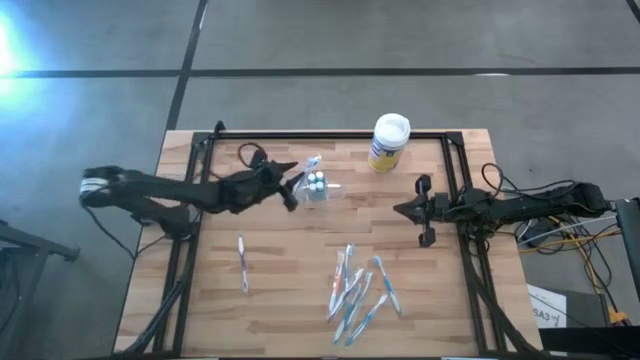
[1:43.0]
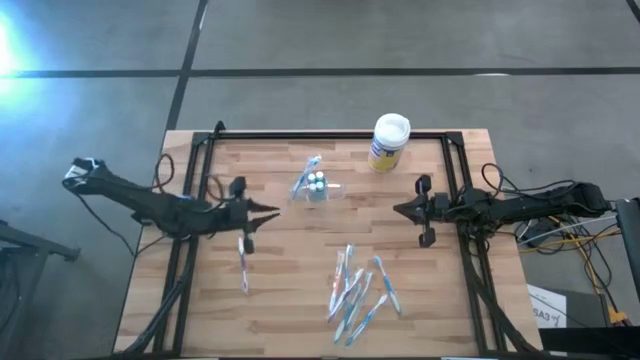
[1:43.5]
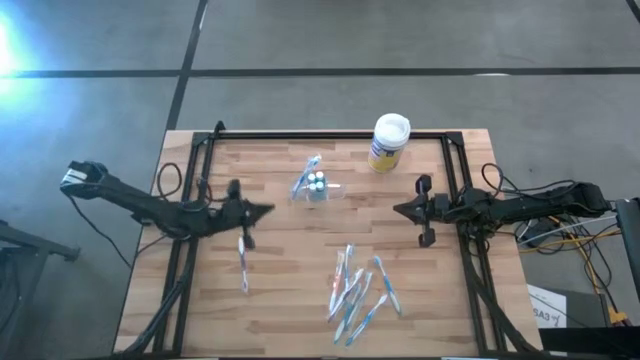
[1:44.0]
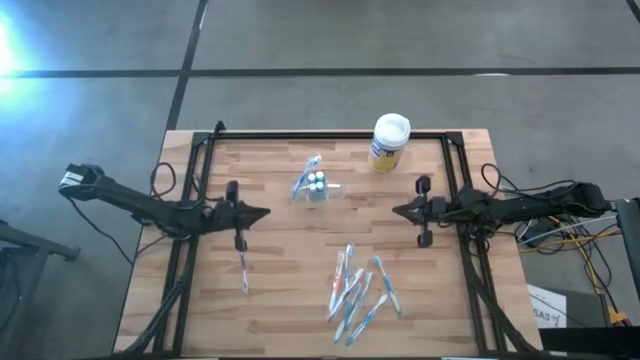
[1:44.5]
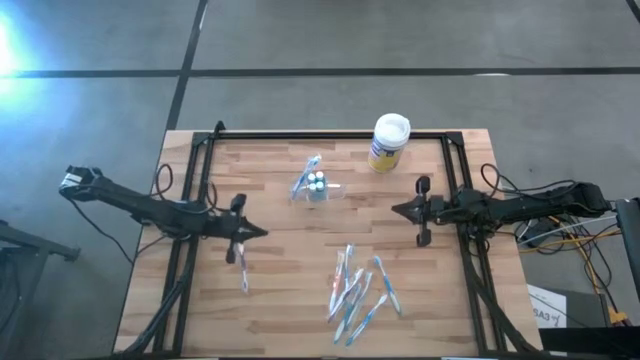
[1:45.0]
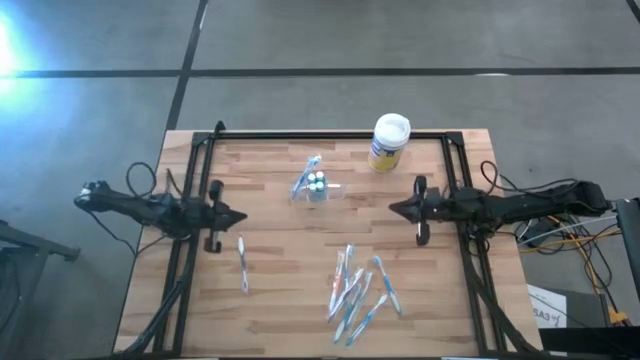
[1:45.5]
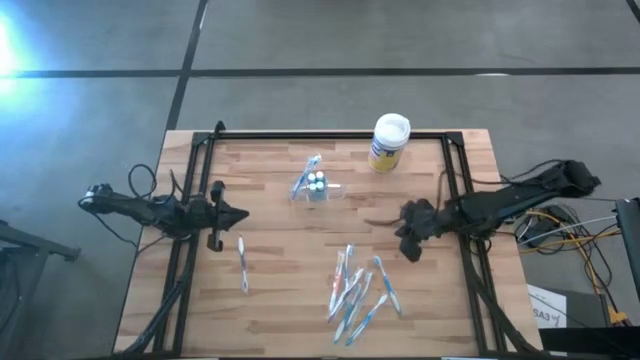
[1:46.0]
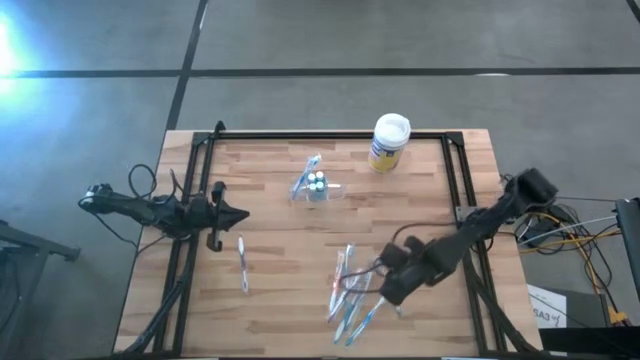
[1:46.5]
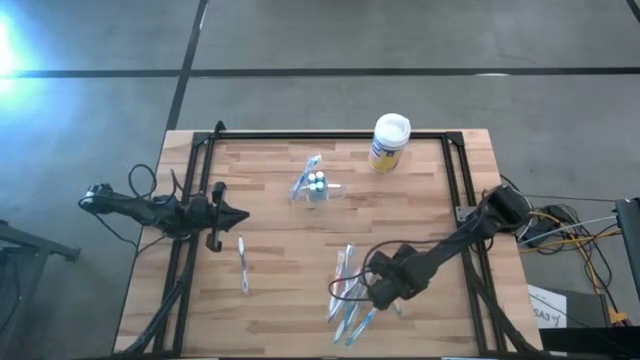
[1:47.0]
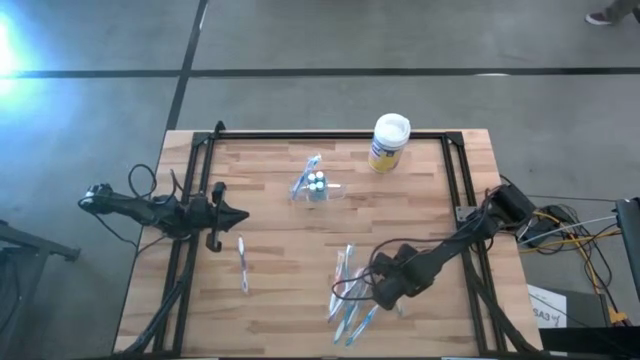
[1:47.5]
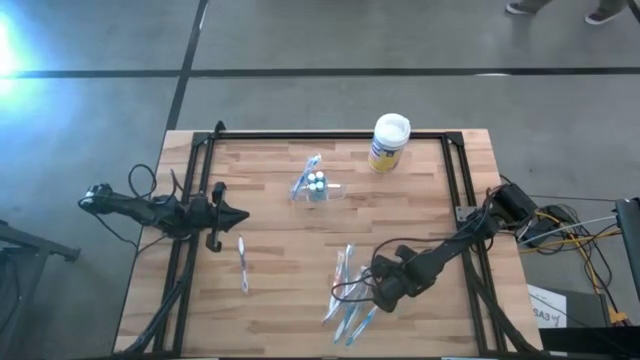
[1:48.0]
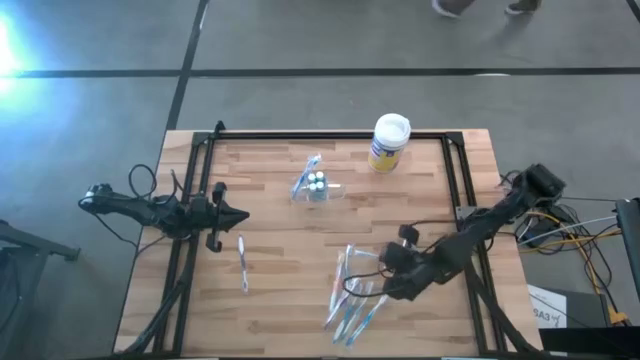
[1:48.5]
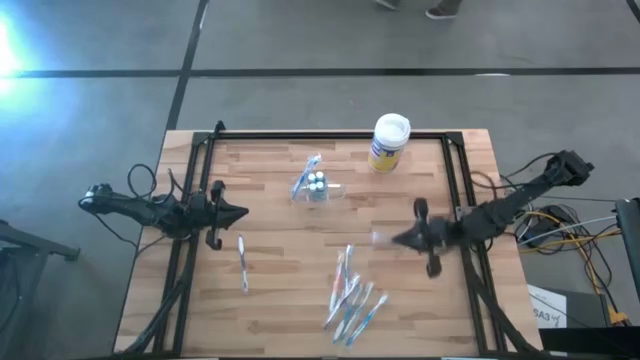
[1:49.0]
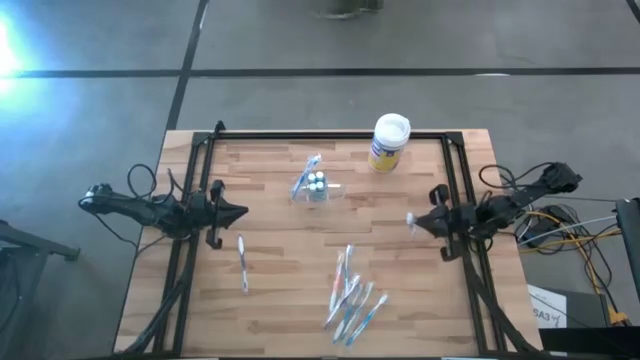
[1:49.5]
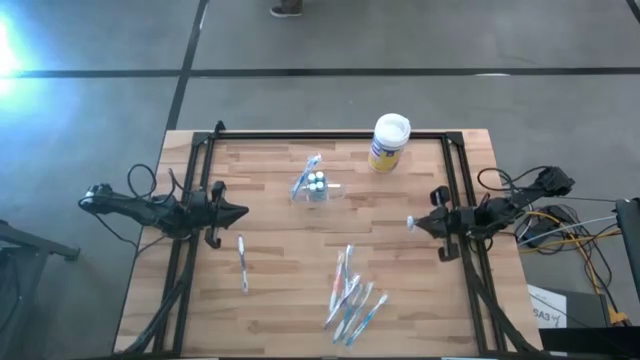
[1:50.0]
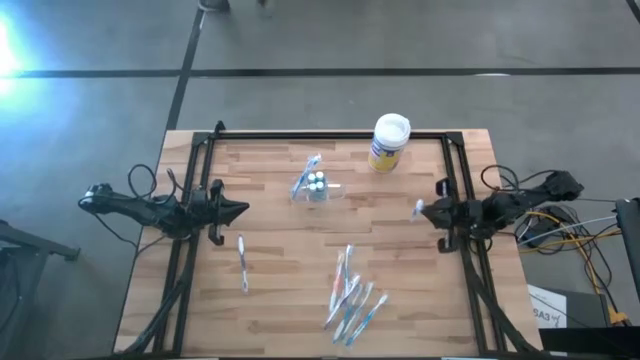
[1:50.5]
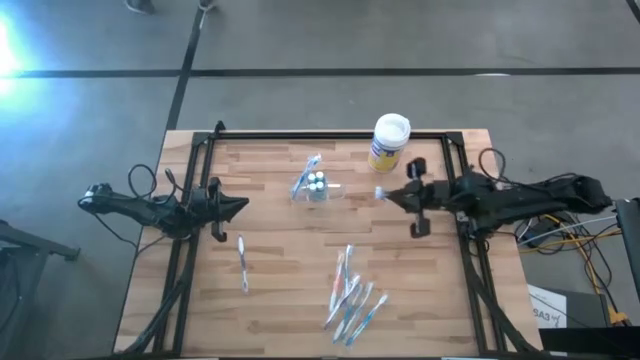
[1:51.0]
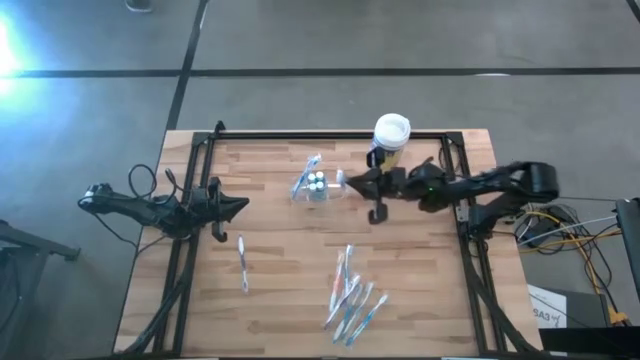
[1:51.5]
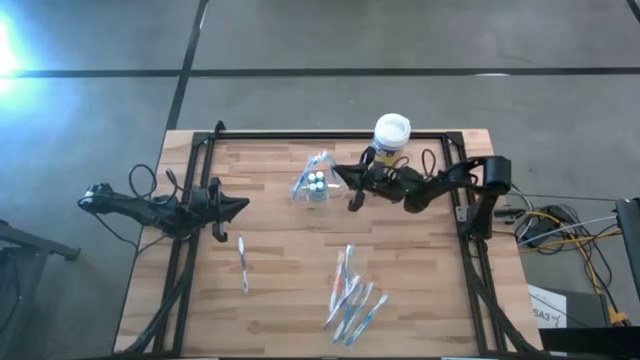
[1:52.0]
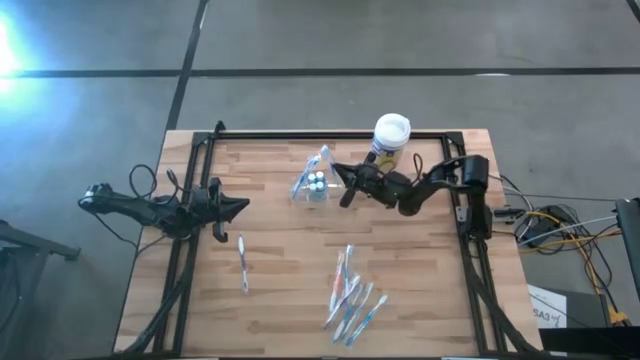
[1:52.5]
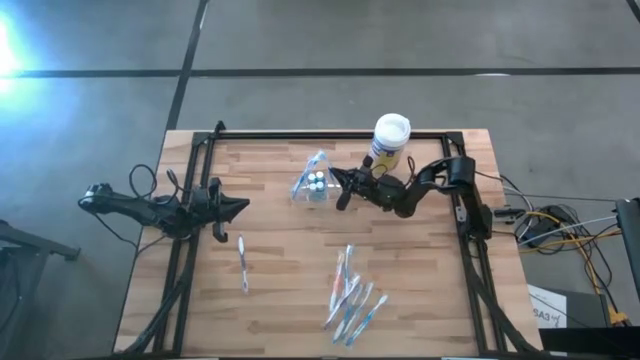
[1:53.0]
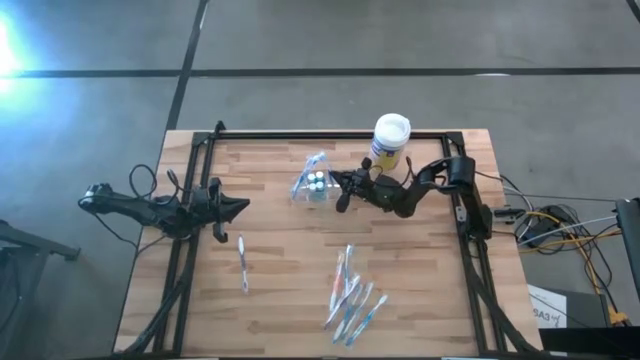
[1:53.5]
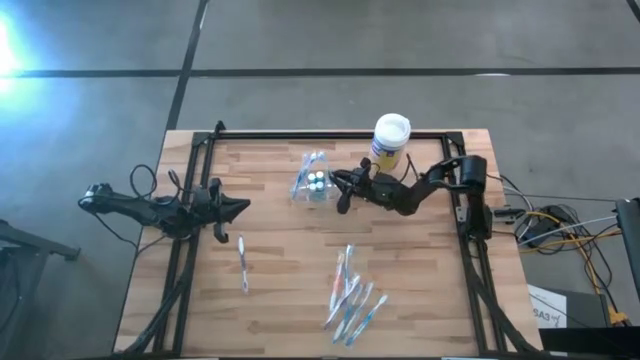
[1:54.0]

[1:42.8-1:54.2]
Task: Pick & Place toothbrushing station
Put the blue toothbrush into the transparent organizer

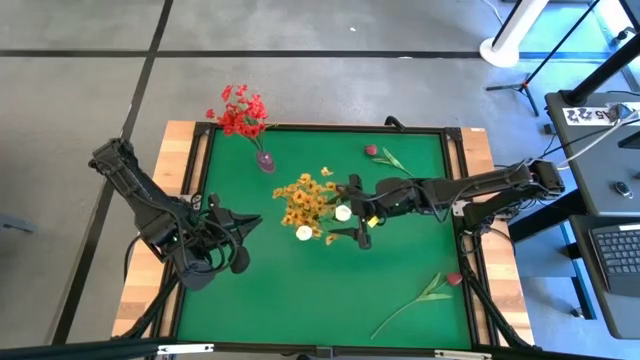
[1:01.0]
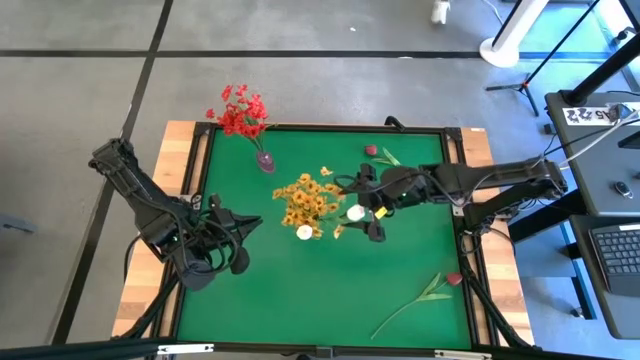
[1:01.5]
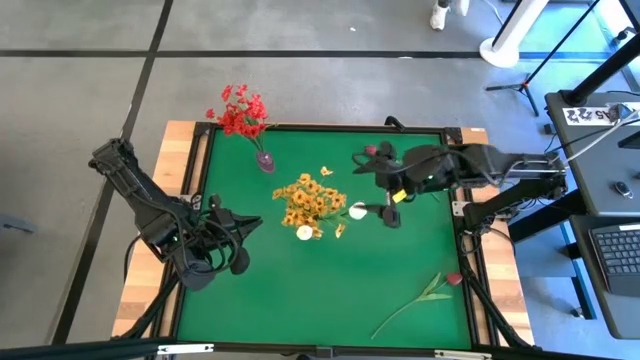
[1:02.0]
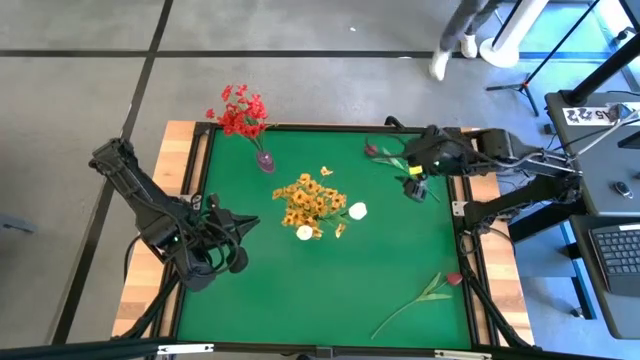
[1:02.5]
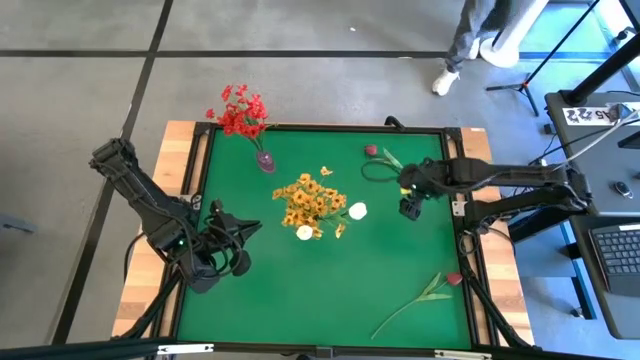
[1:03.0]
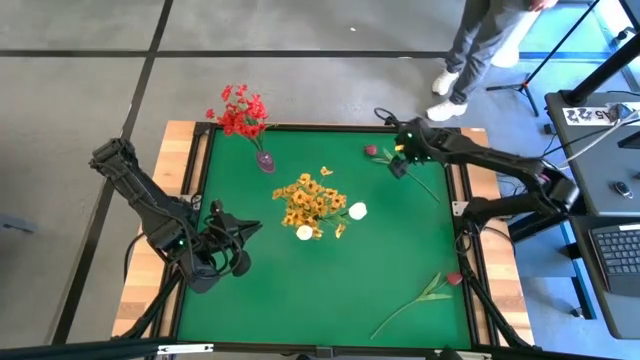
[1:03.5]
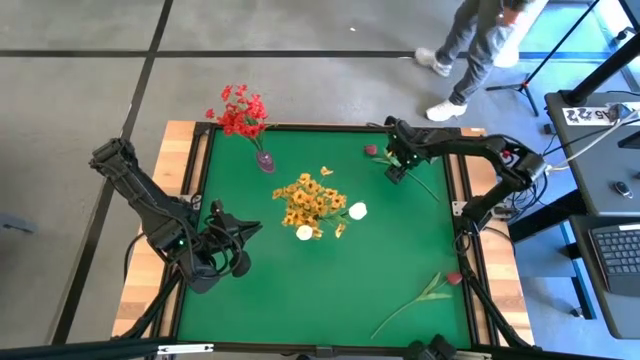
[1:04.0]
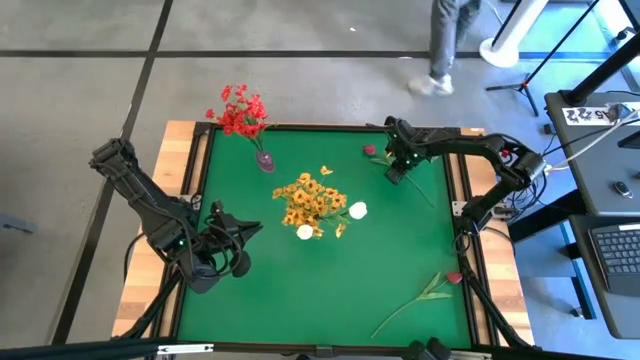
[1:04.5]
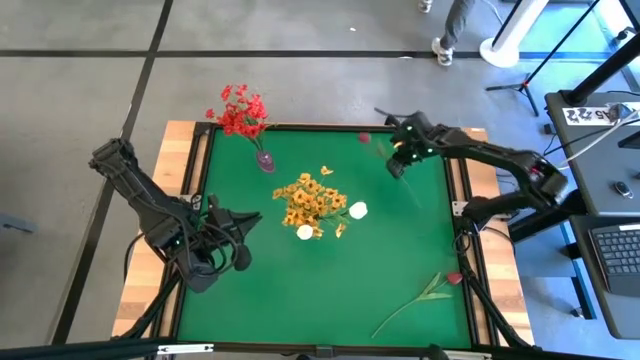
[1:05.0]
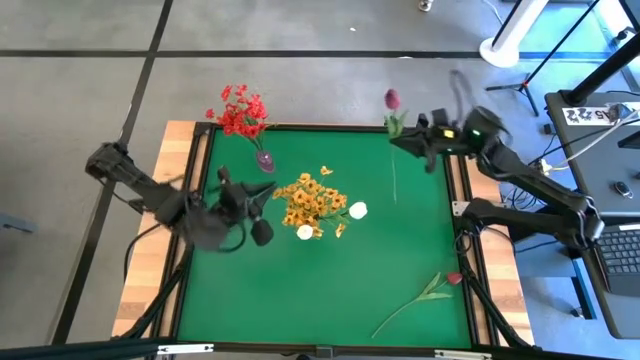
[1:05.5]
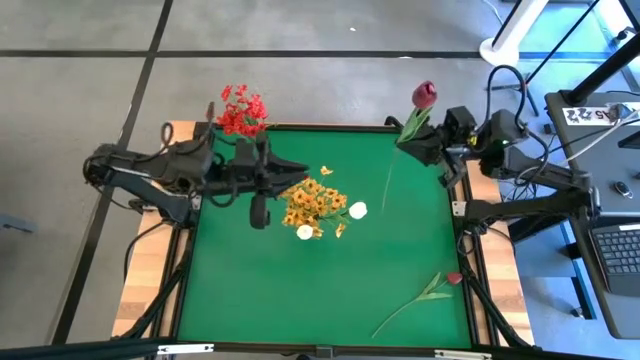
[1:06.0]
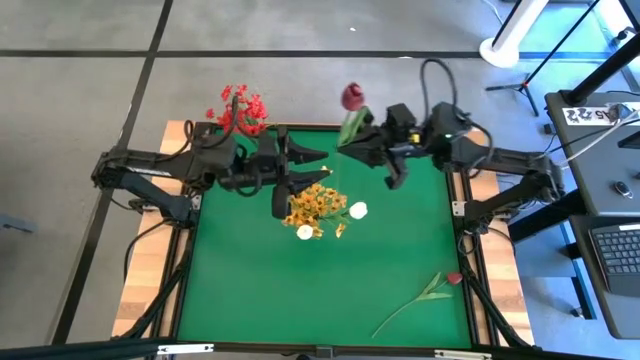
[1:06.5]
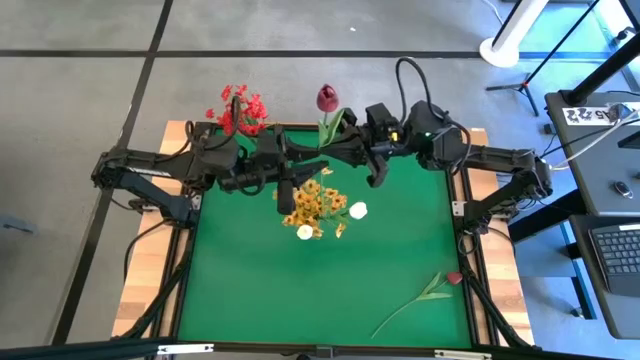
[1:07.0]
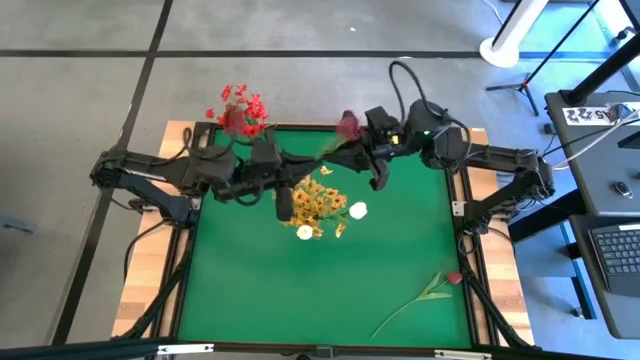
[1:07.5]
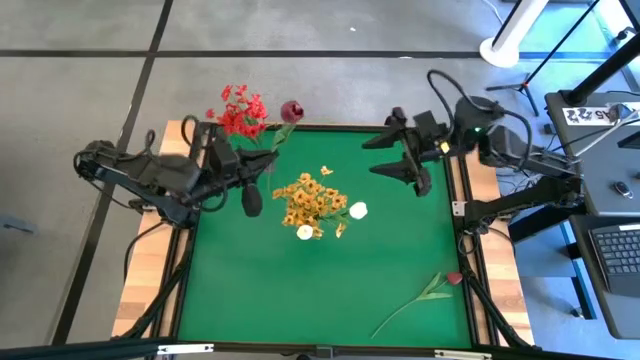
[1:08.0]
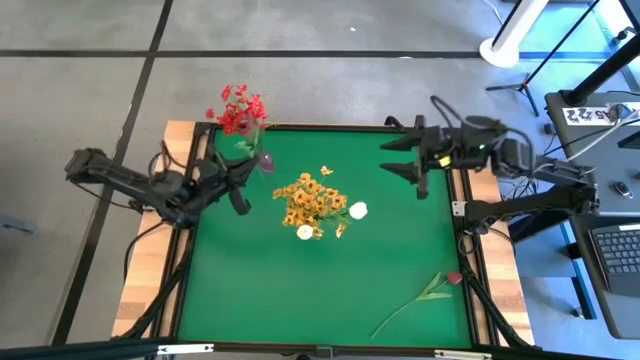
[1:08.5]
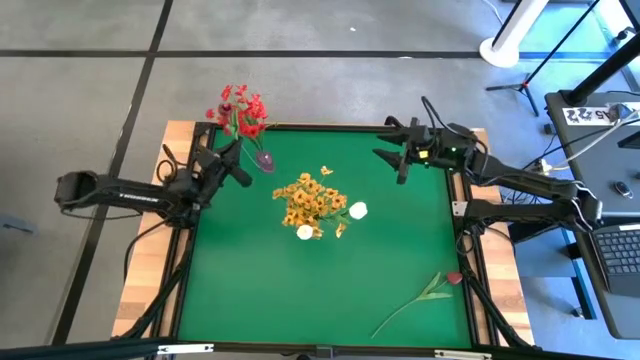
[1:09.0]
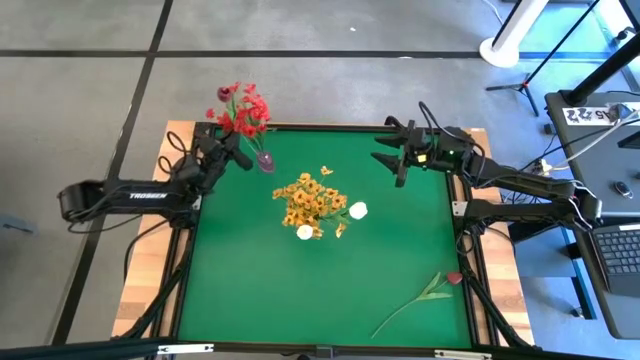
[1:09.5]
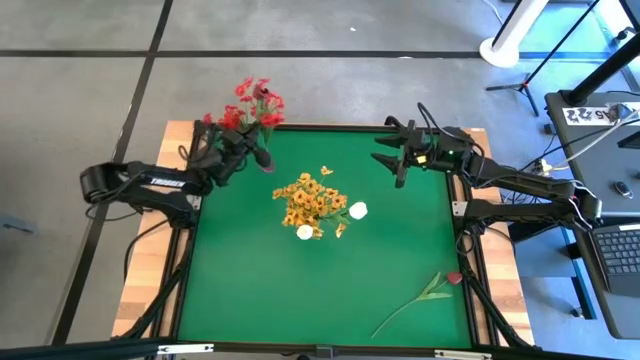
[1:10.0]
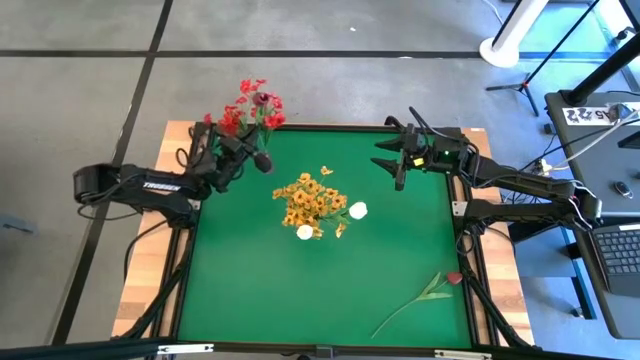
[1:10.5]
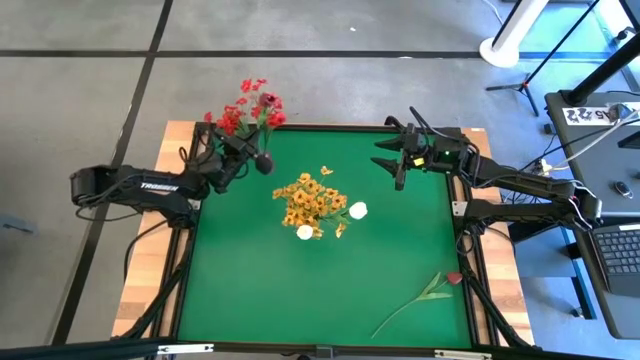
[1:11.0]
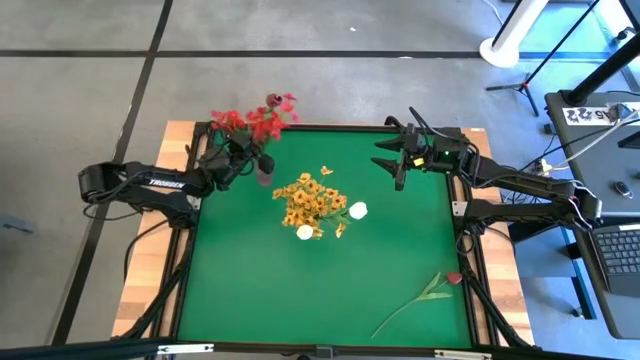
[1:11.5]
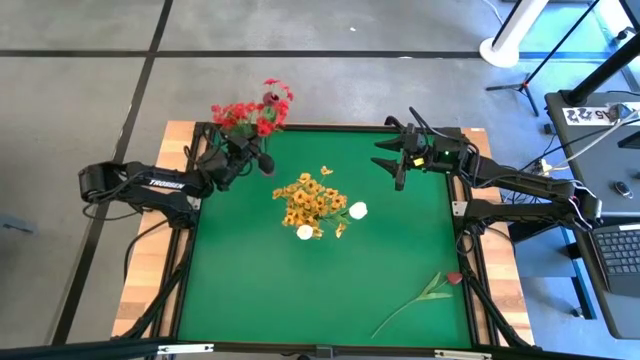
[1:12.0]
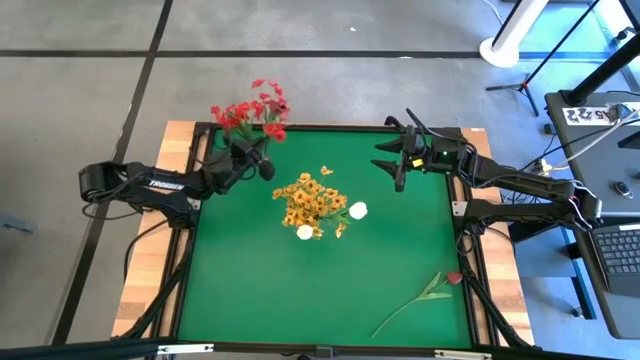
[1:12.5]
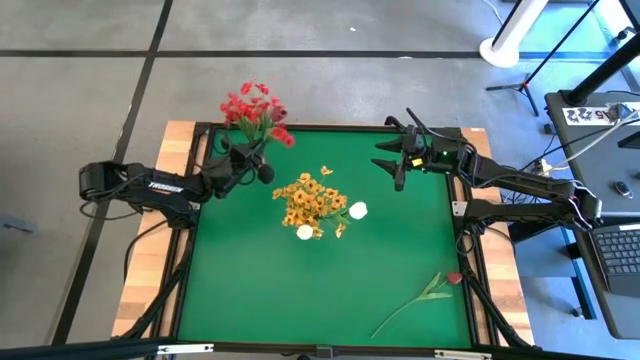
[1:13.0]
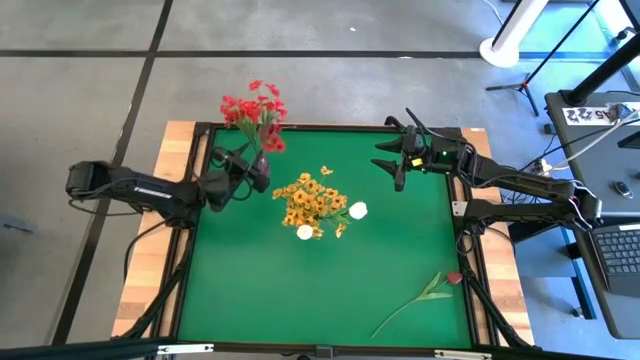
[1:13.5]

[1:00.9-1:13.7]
Task: Sort flowers into vase by color
Put the top red tulip into the violet vase
